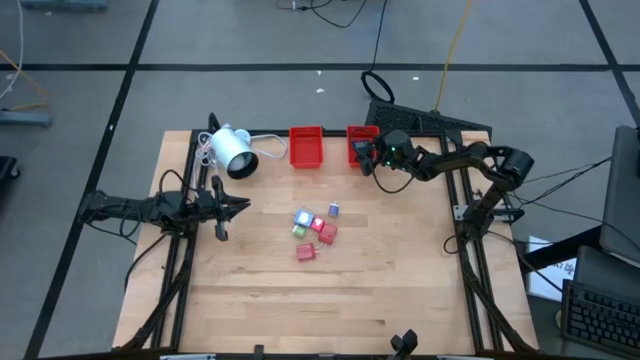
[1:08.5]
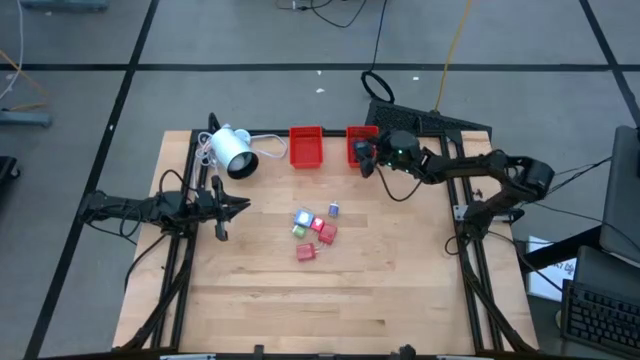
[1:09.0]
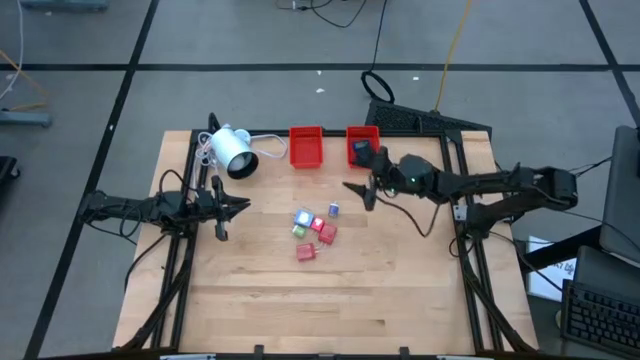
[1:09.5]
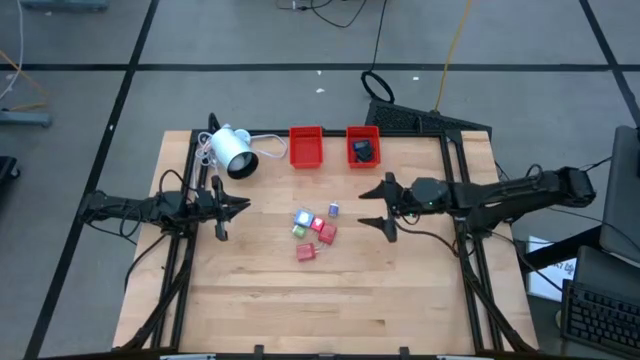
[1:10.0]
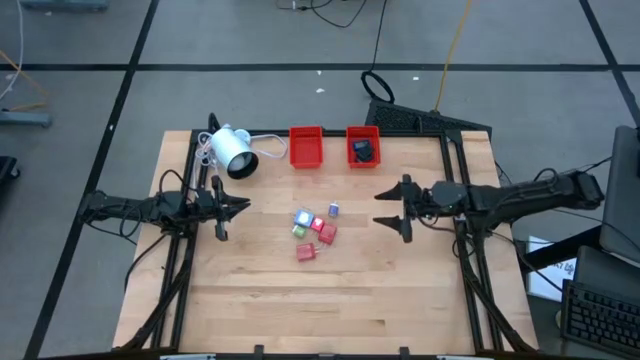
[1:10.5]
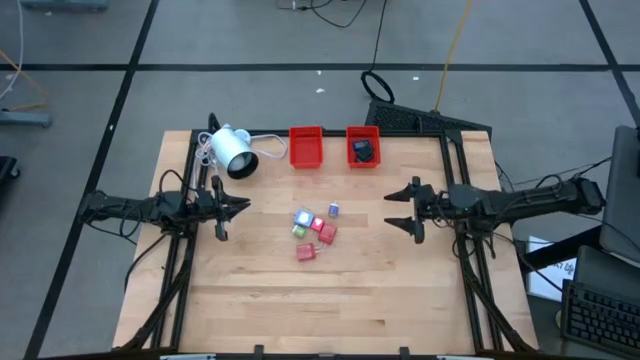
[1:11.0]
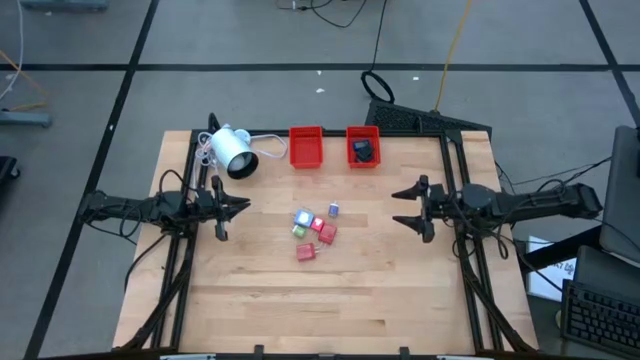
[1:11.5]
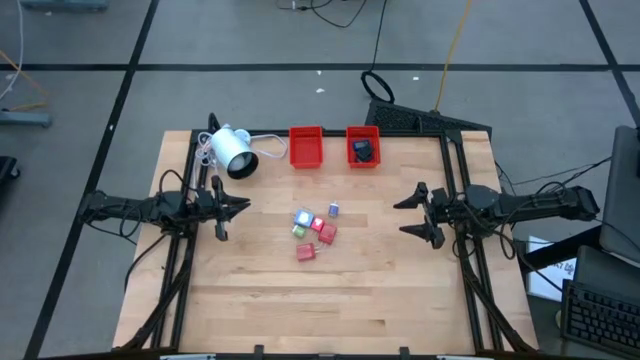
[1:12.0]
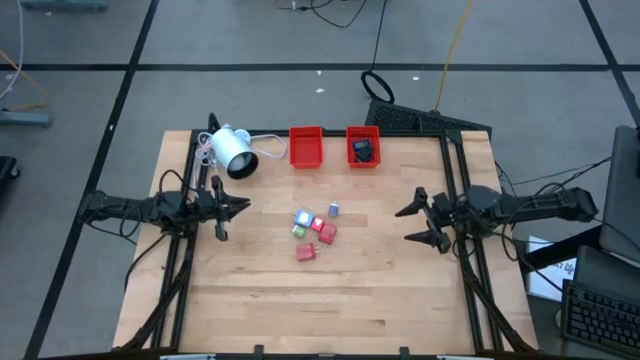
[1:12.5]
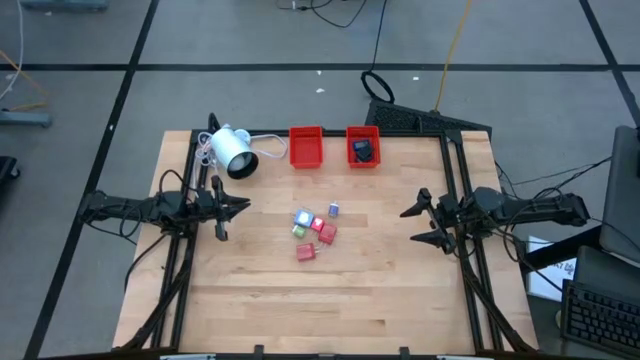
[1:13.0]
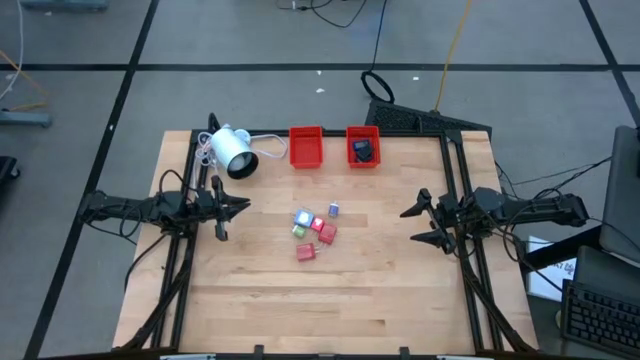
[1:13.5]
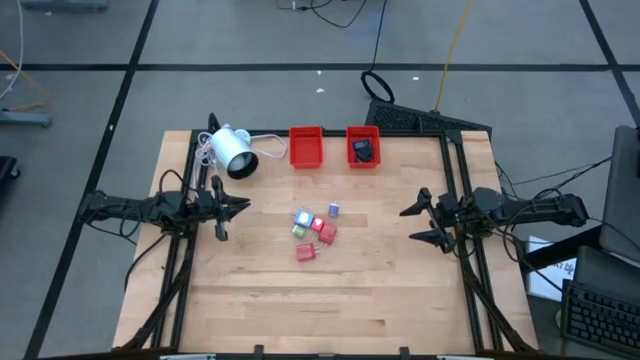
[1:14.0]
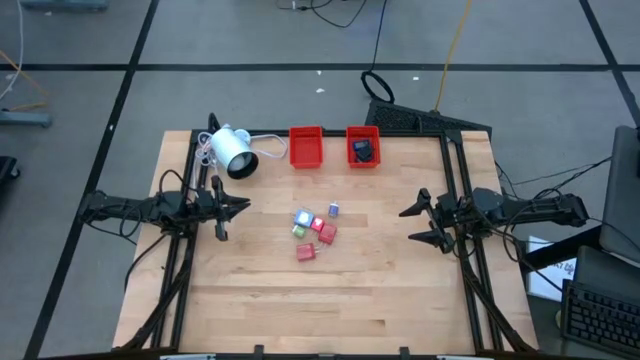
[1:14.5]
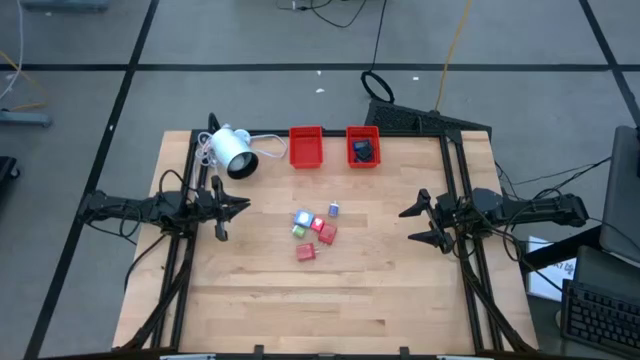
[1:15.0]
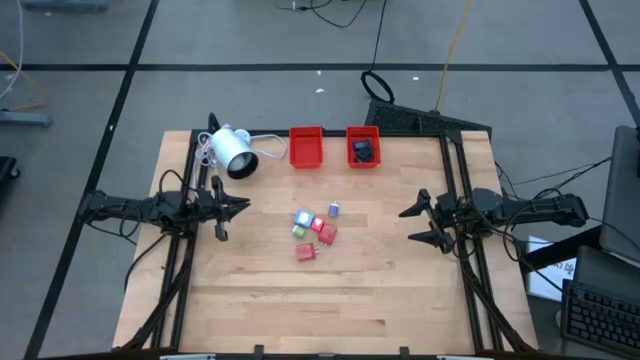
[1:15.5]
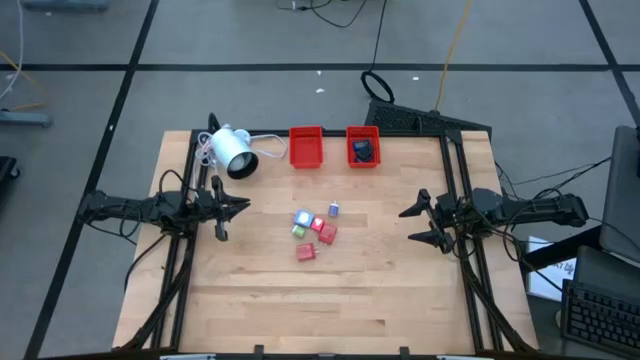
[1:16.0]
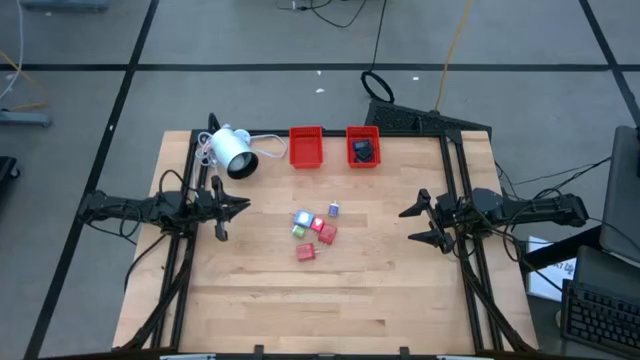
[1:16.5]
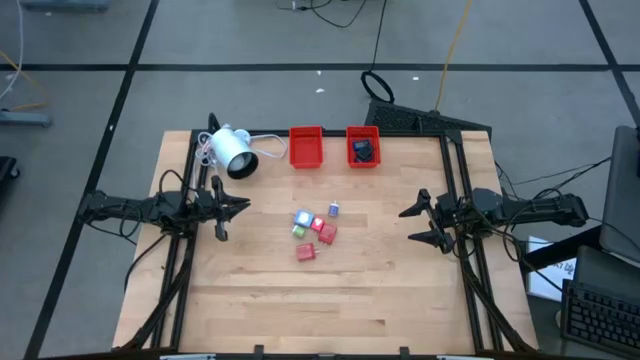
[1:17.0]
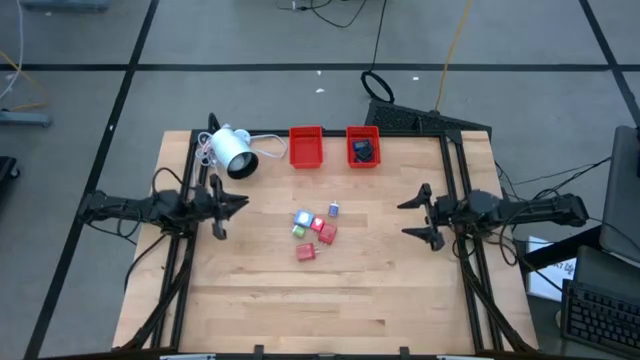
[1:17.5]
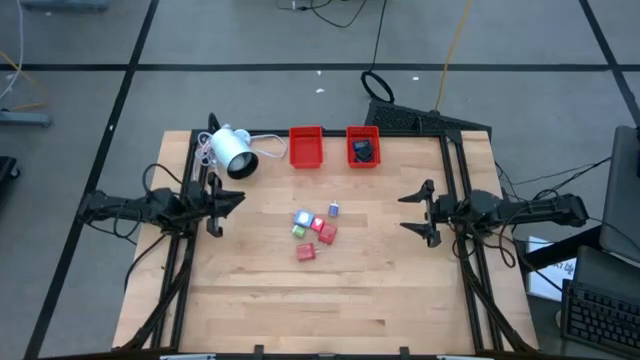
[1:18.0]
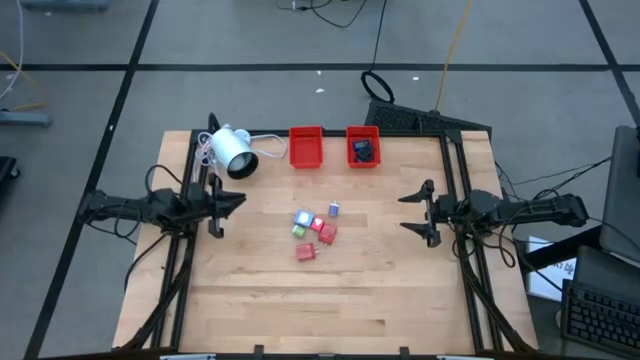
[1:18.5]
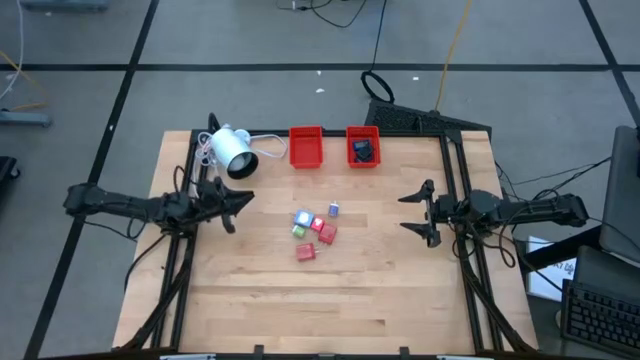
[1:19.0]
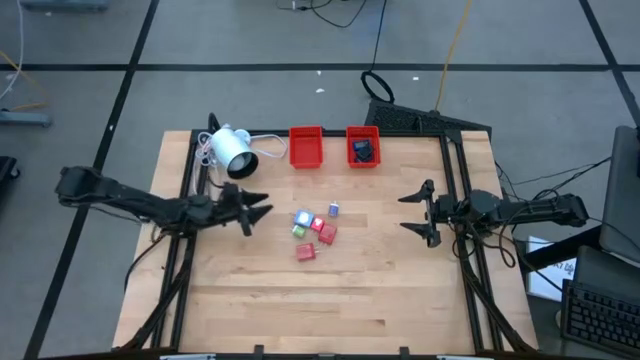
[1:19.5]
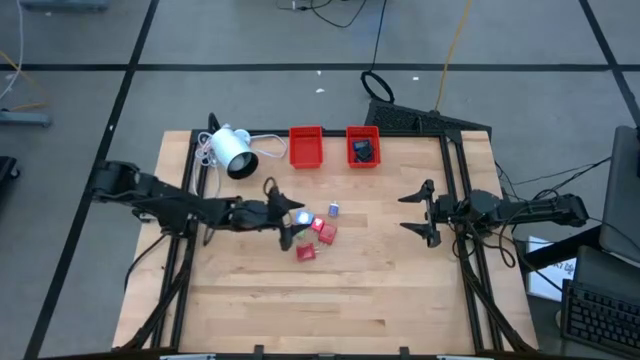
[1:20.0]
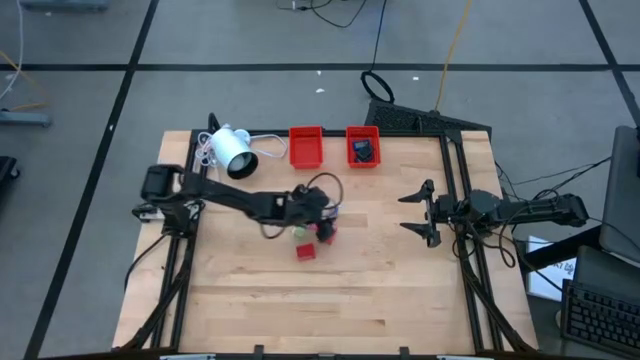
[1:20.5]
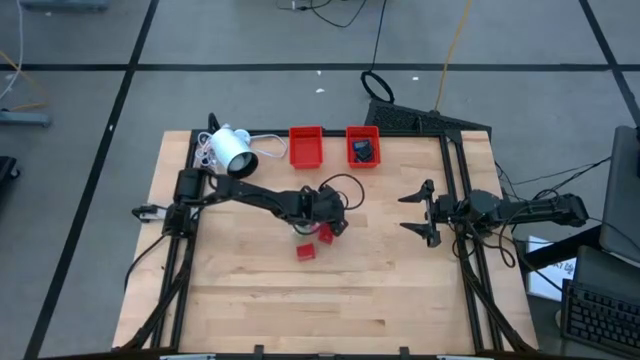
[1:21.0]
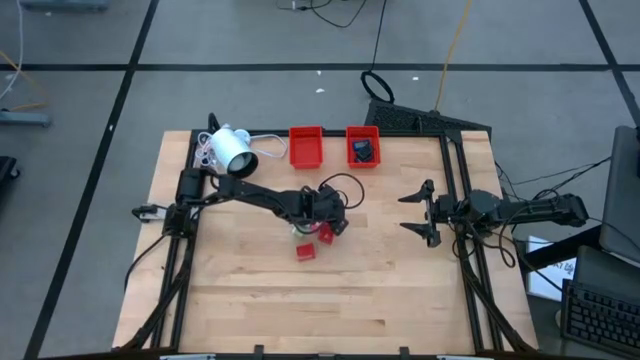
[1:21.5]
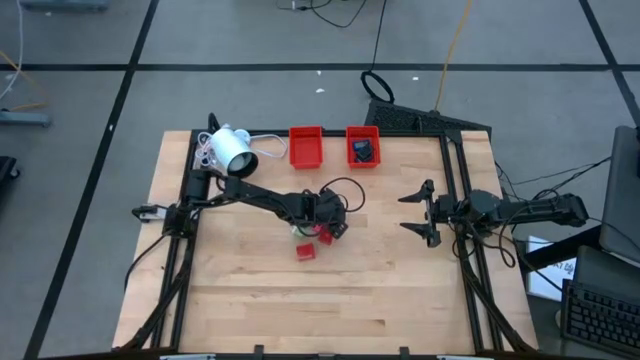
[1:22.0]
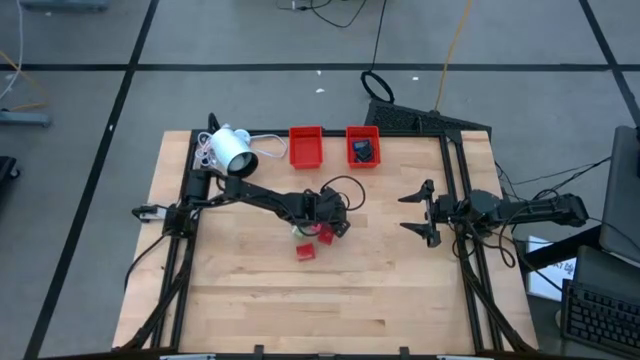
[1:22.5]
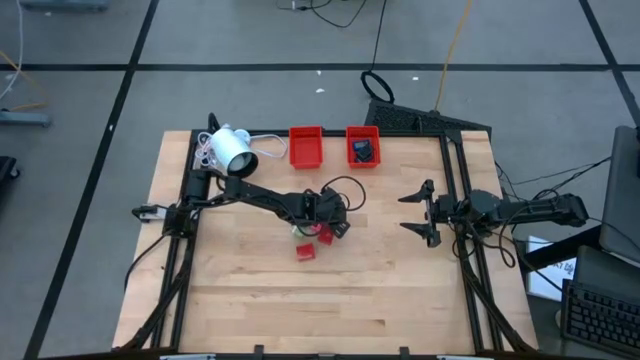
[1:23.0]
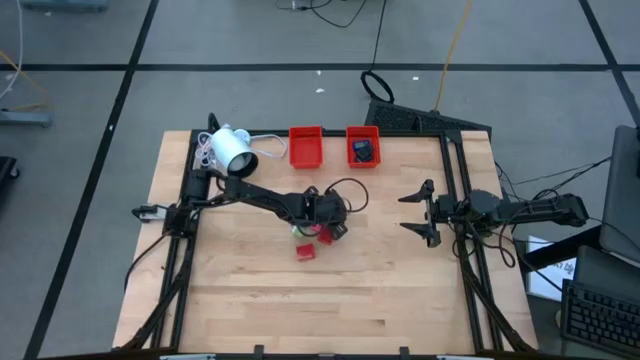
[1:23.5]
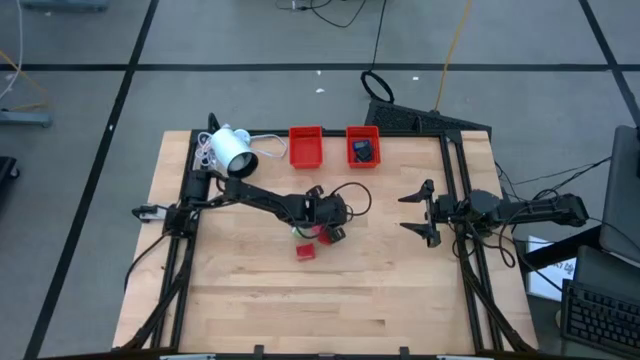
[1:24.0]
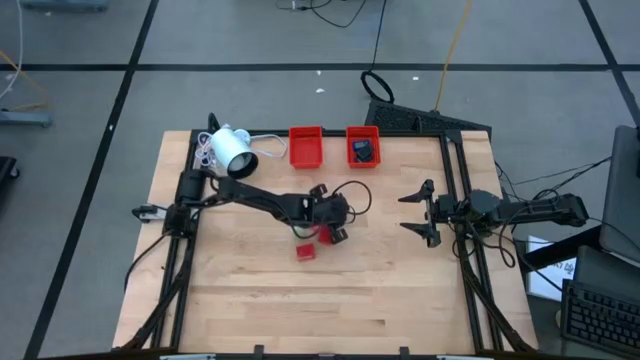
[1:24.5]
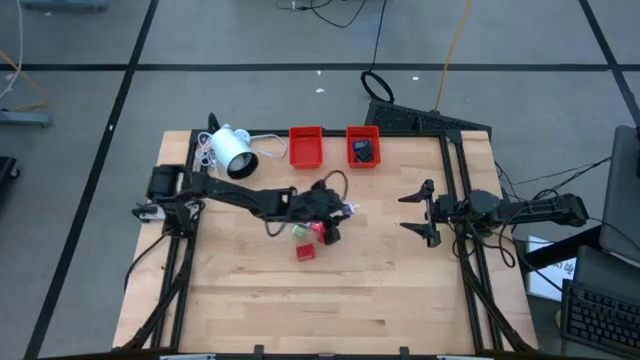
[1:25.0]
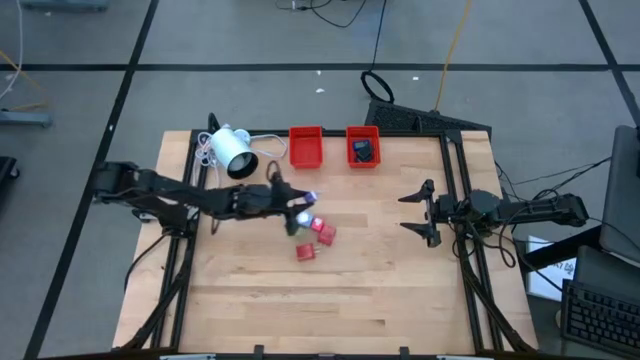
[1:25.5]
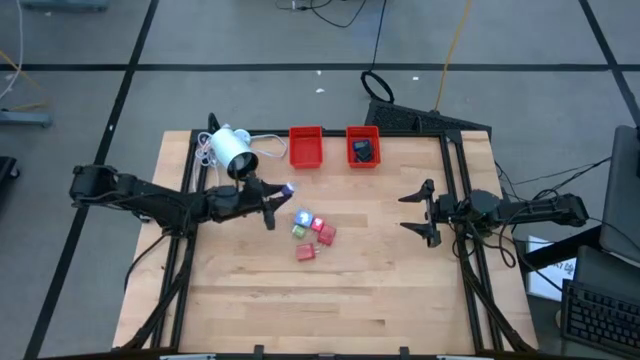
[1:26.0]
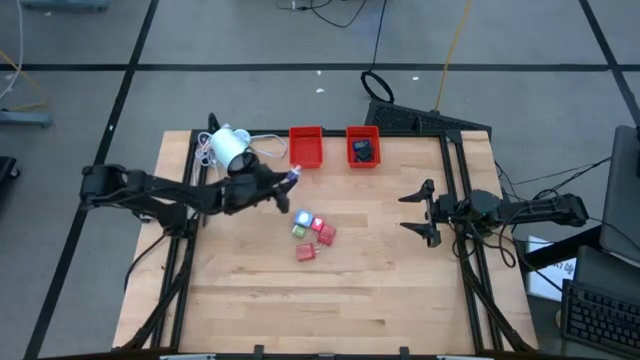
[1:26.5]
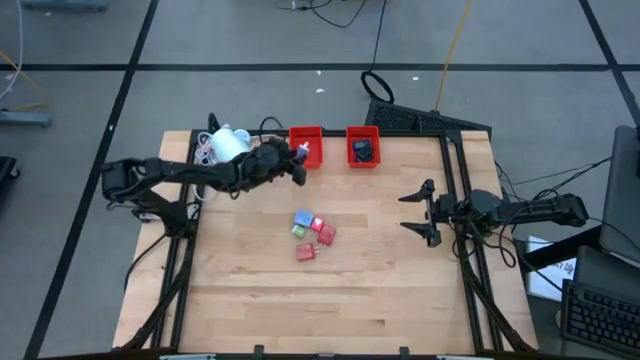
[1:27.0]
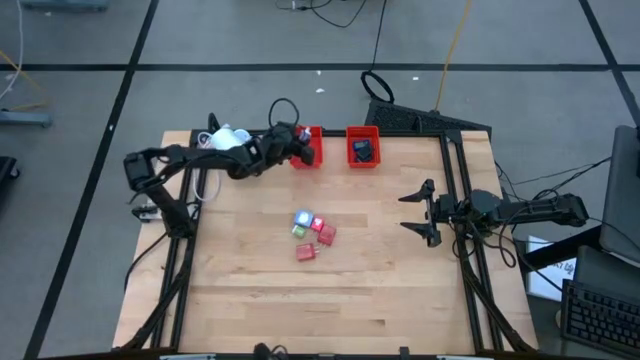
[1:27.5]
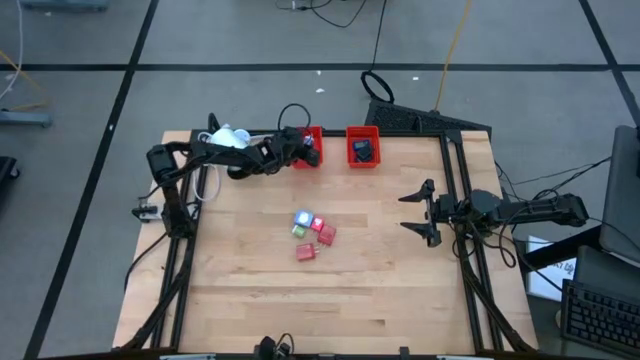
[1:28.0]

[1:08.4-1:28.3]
Task: Pick & Place Office items
Put the violet charger adapter into the left red bin
